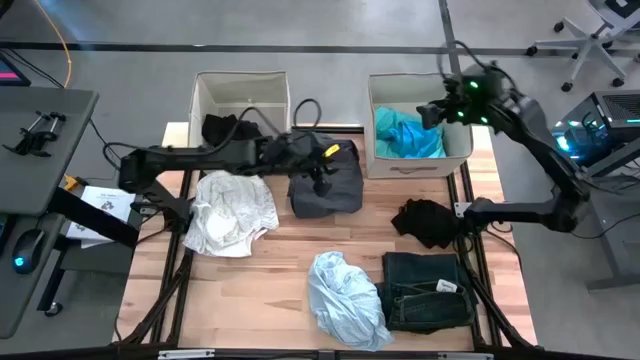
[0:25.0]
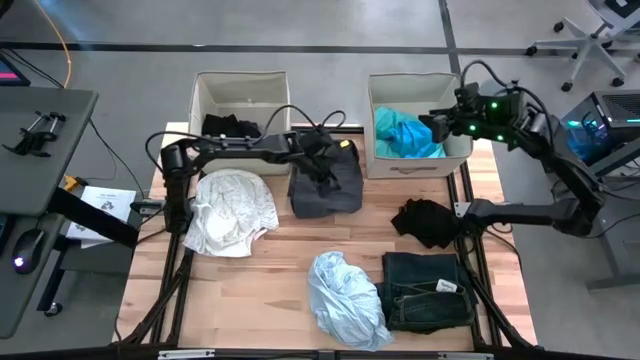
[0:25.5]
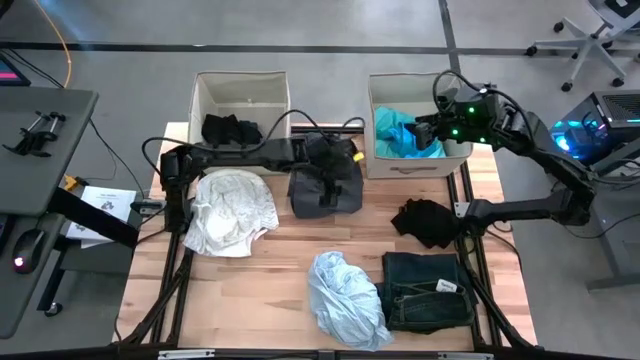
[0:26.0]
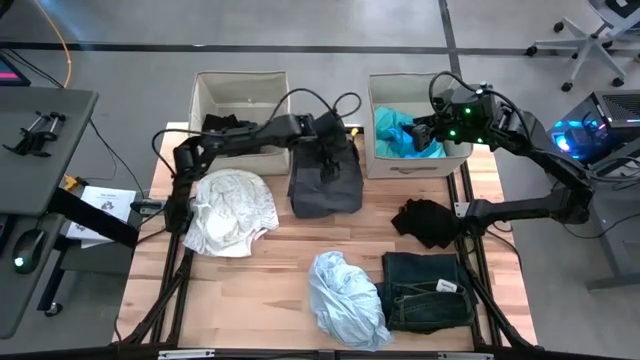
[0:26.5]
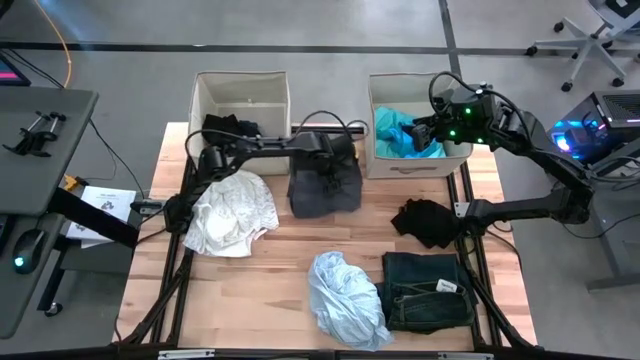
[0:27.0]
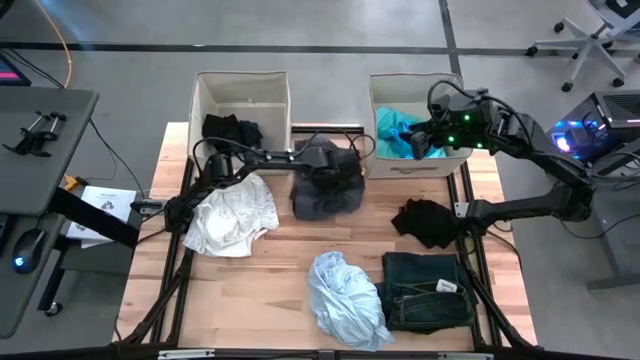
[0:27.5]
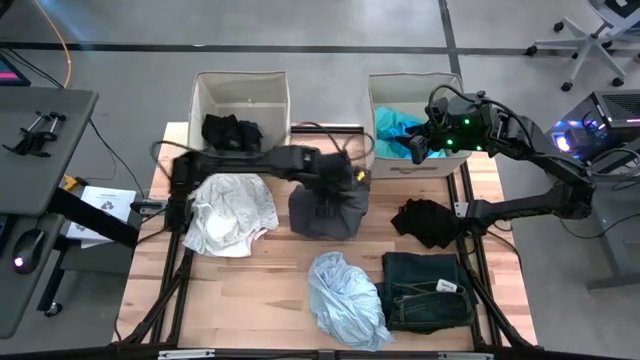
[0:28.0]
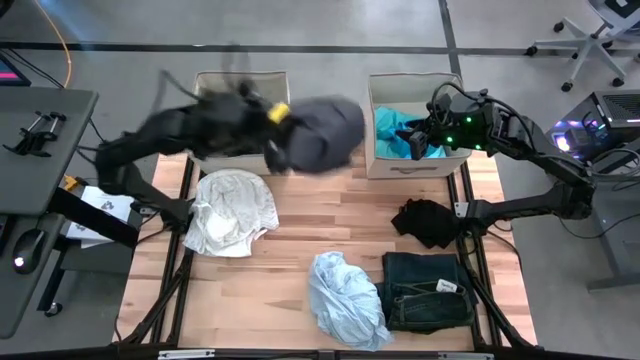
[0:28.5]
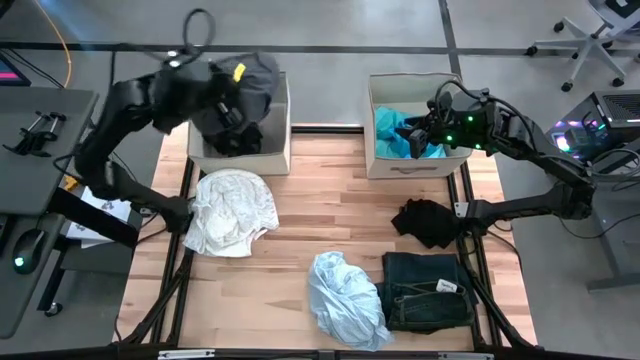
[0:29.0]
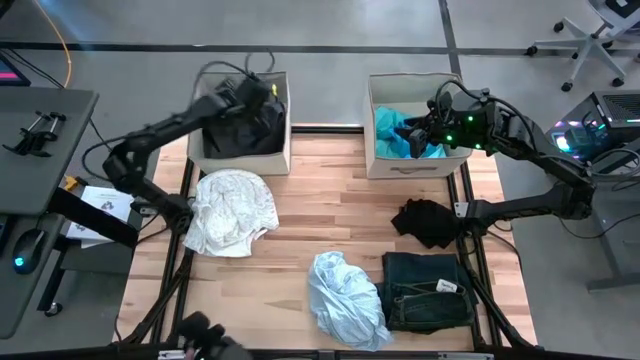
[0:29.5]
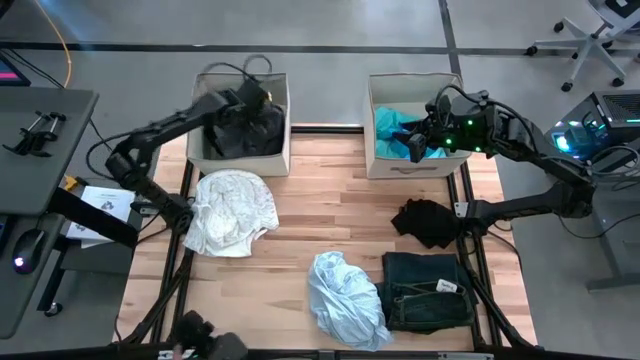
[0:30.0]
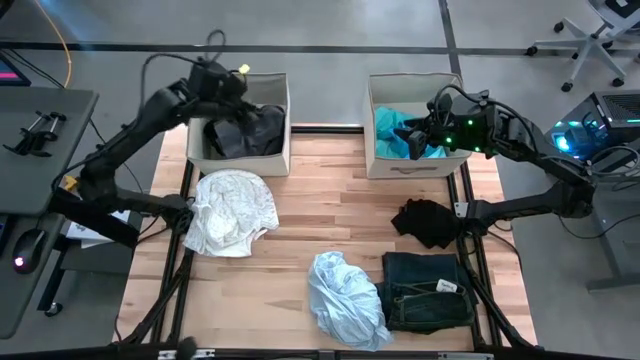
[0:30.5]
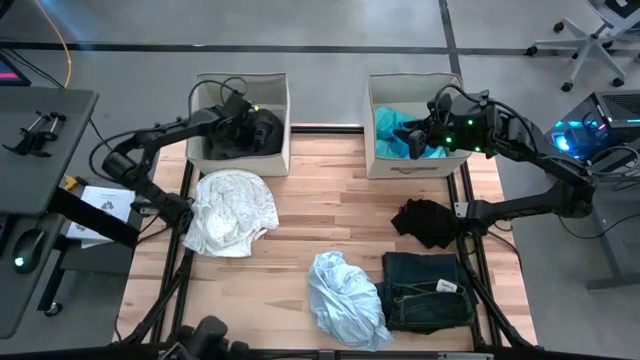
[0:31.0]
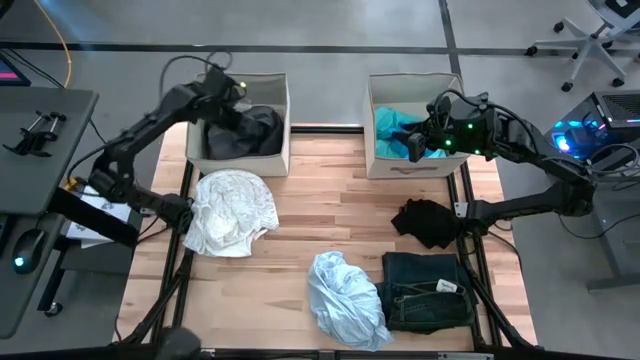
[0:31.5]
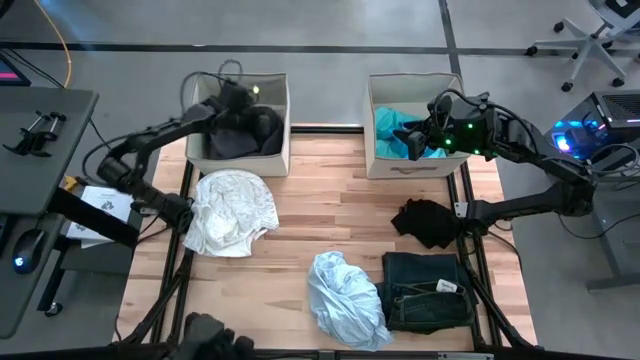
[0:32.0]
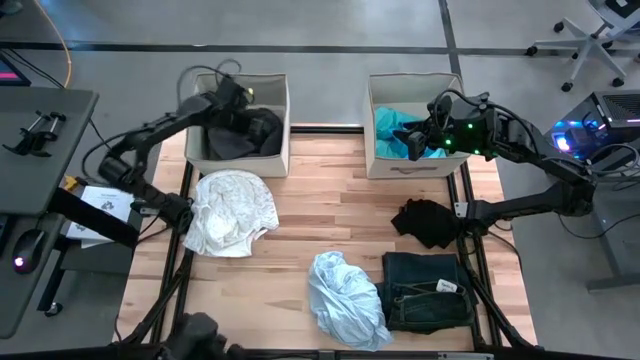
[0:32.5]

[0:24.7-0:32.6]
Task: Sort clothes
Put the gray pants into the left laundry organizer

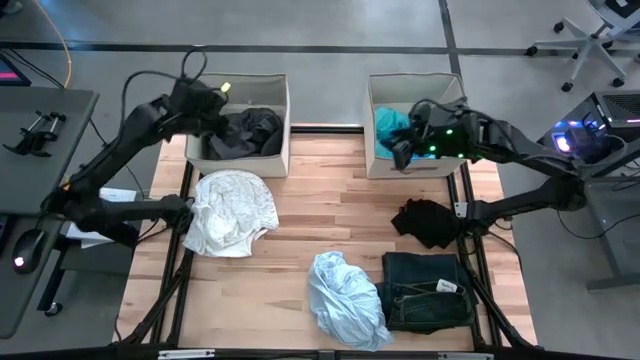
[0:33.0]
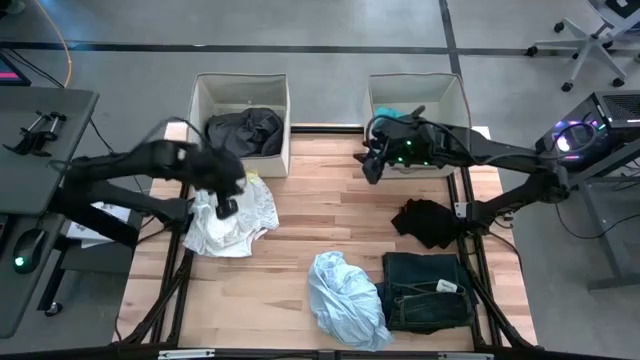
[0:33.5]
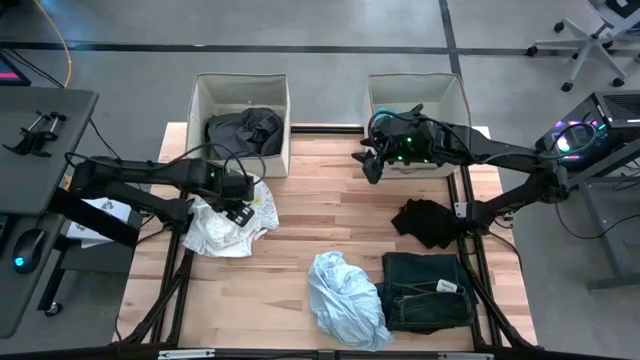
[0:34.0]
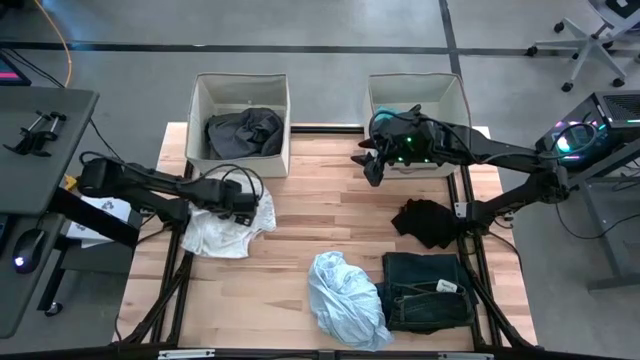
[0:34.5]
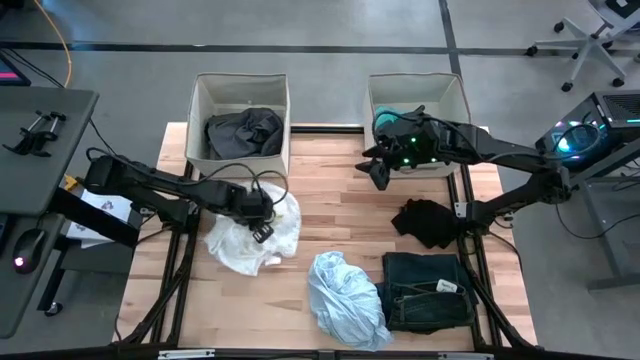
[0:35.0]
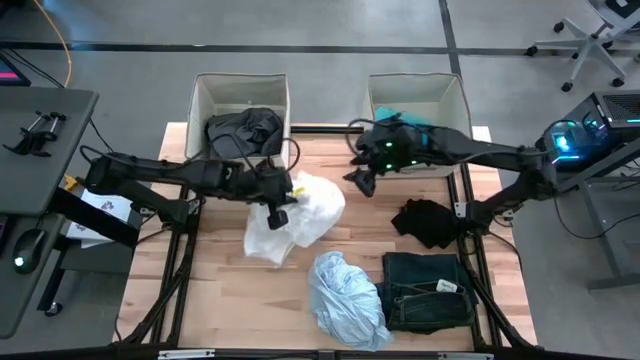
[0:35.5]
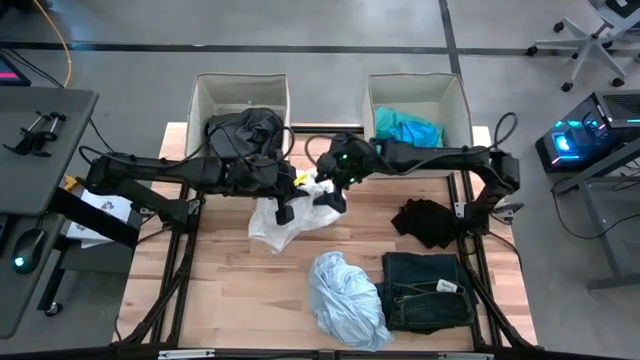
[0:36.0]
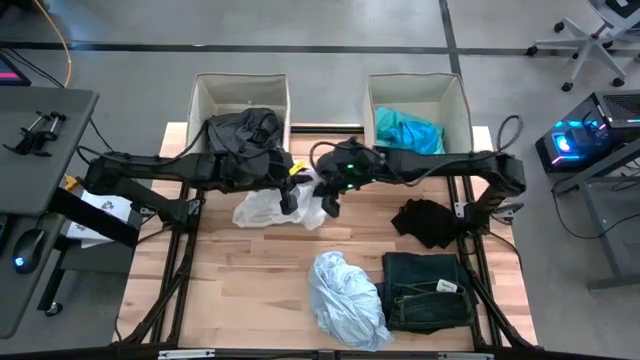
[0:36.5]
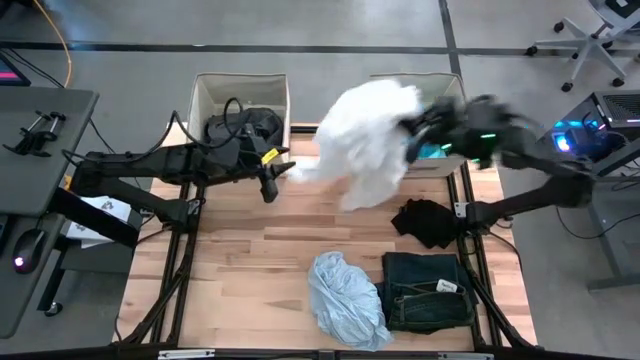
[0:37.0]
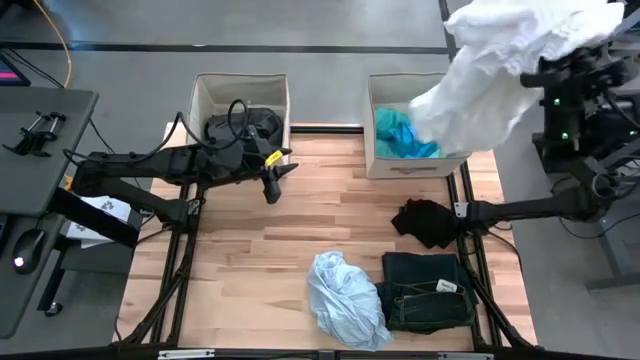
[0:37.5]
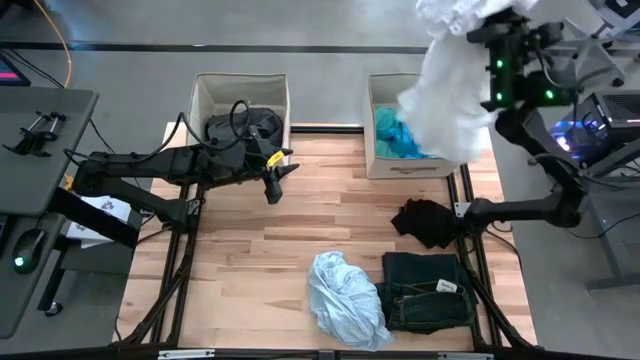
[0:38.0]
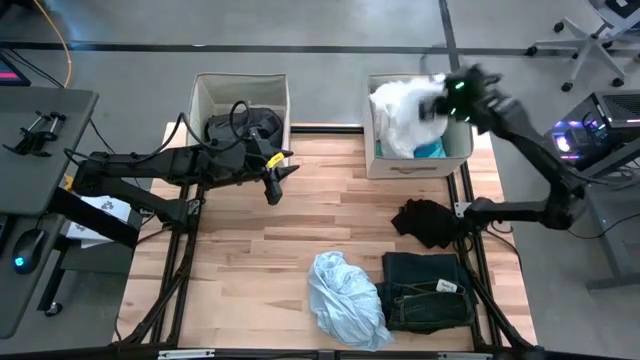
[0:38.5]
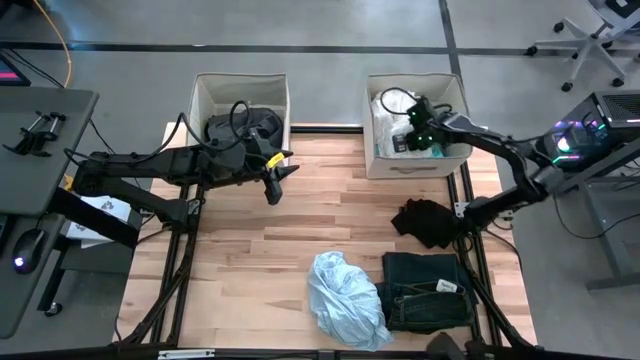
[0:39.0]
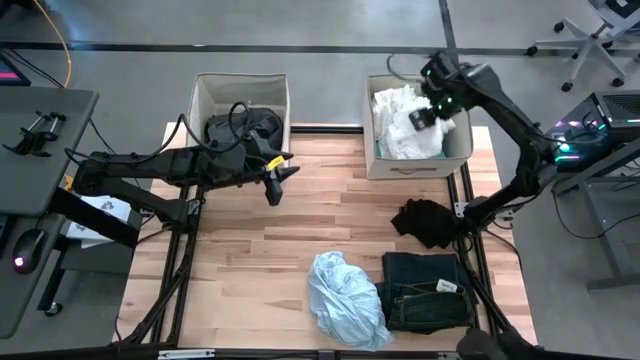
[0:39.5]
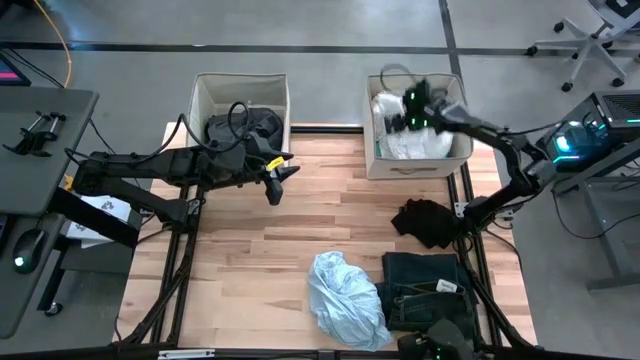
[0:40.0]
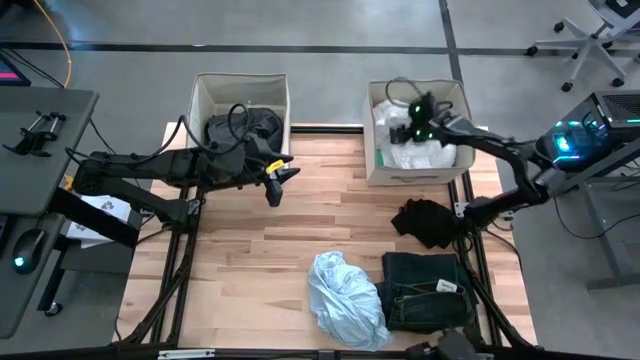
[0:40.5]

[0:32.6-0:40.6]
Put the white dress into the right laundry organizer

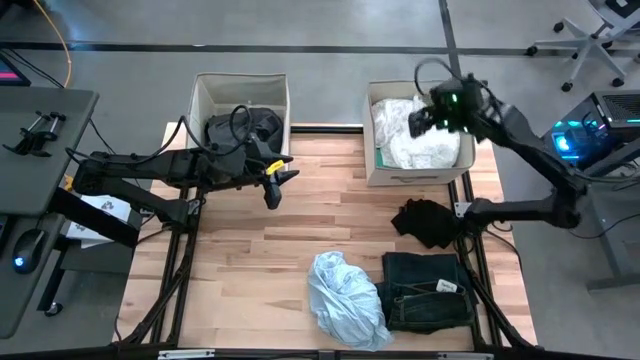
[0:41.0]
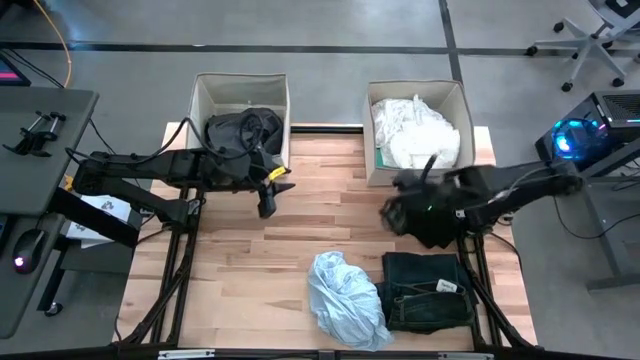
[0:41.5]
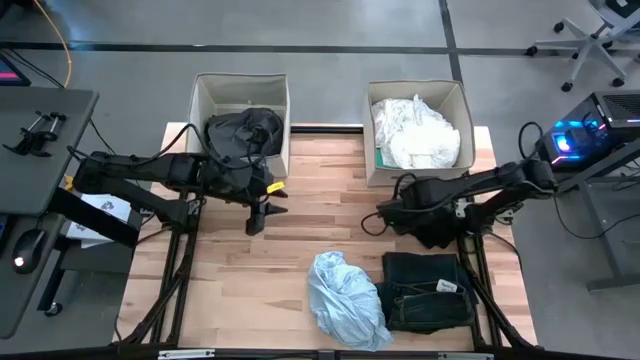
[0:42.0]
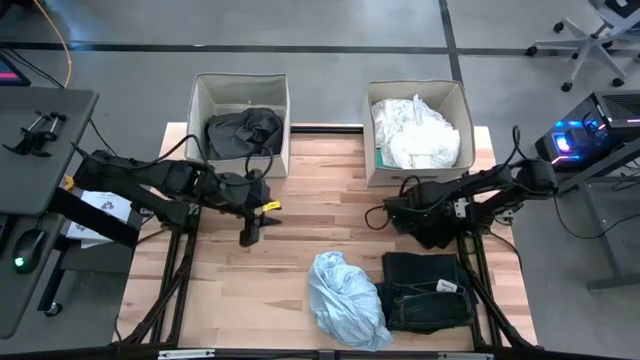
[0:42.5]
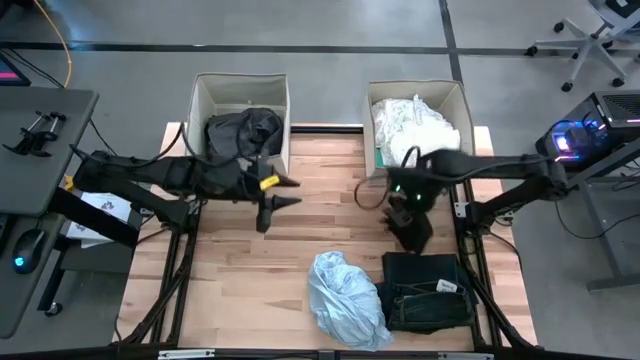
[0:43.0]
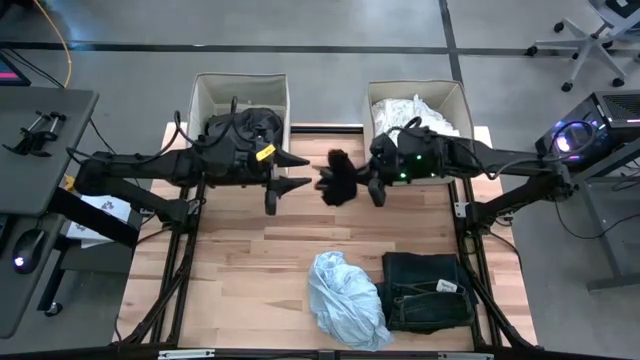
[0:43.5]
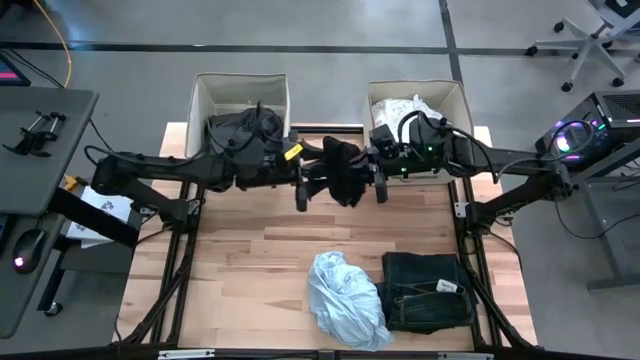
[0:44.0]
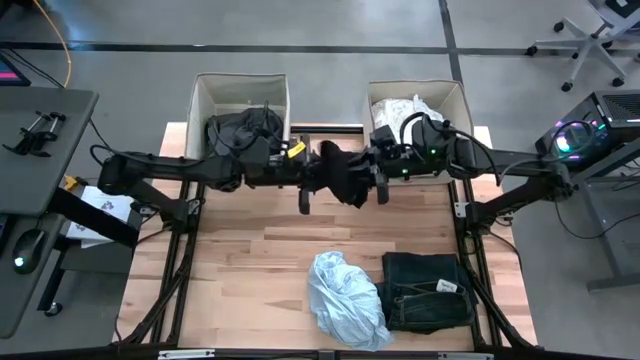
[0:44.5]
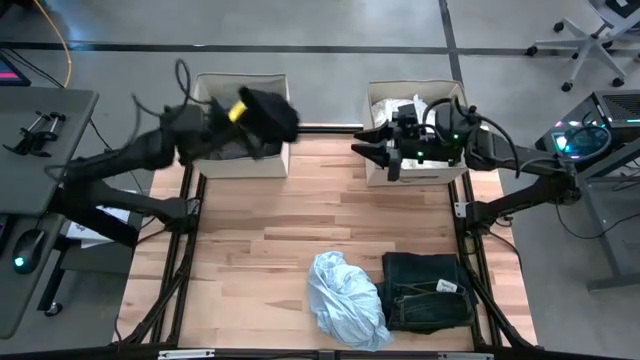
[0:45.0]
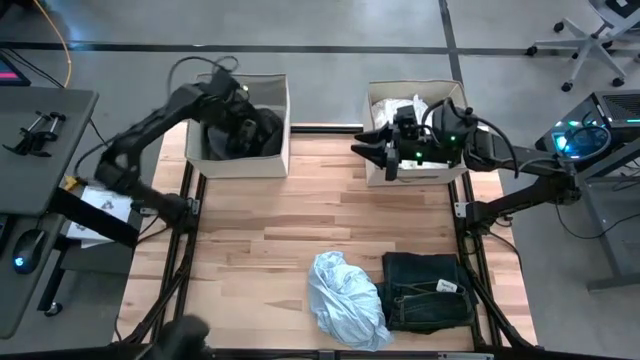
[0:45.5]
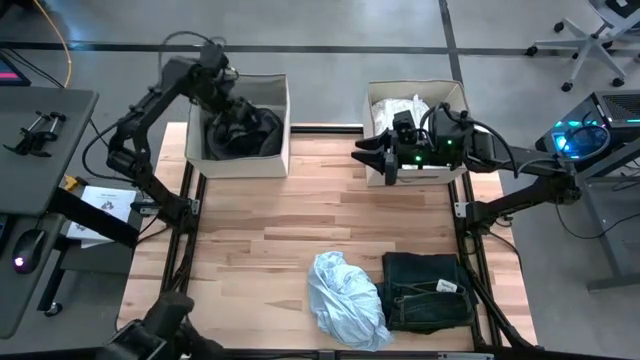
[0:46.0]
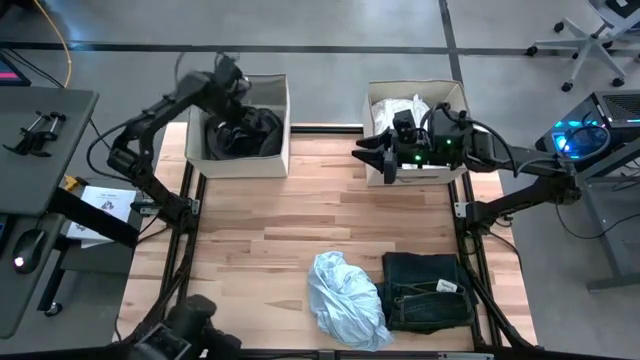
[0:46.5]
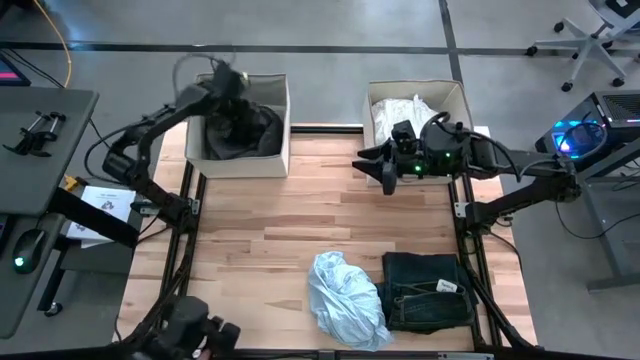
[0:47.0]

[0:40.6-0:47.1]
Put the black underwear into the left laundry organizer
